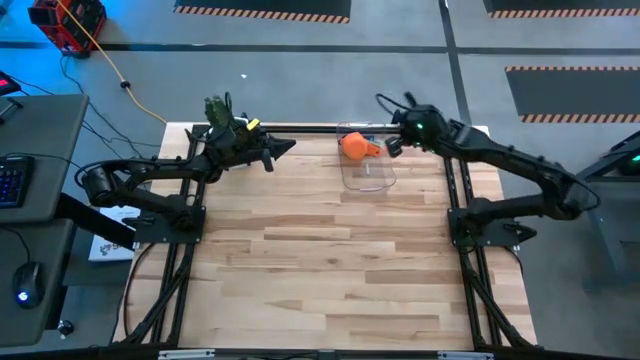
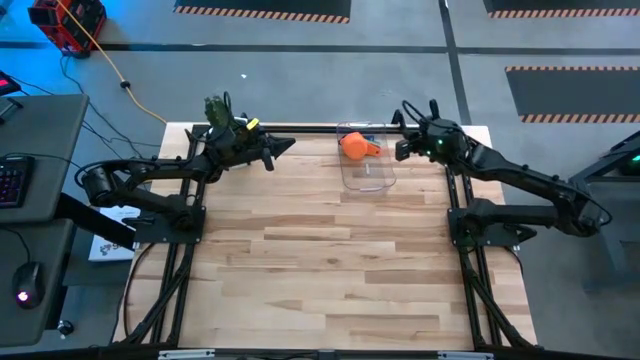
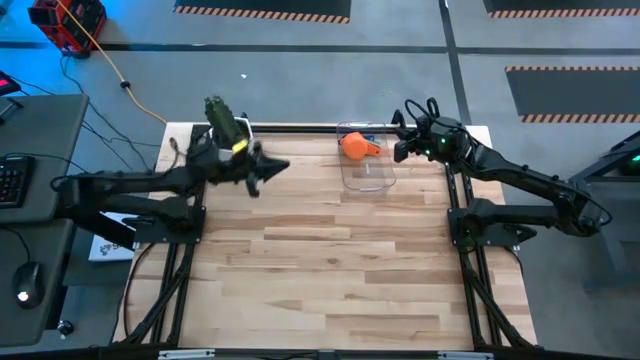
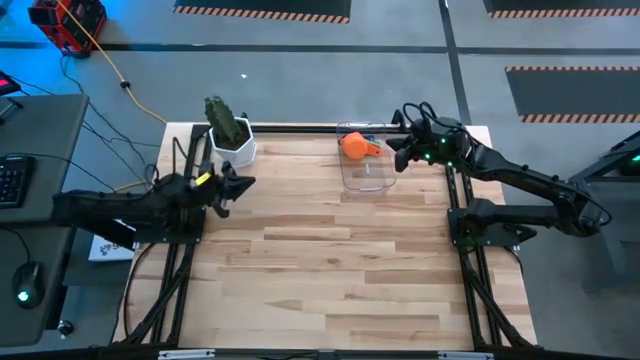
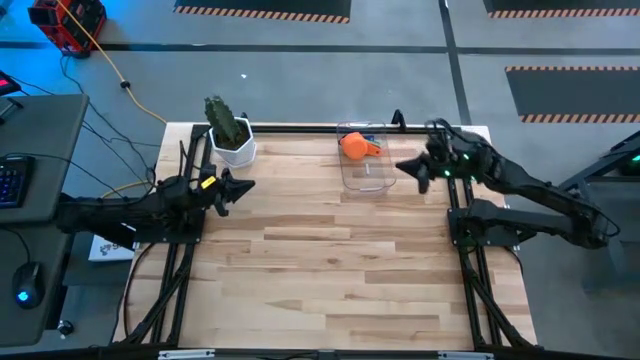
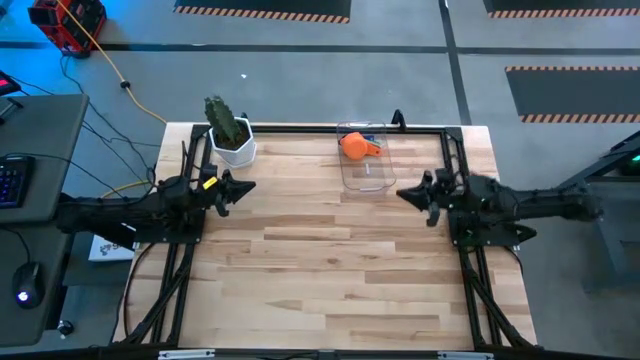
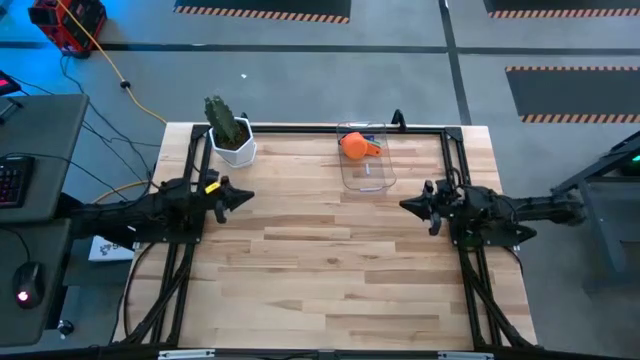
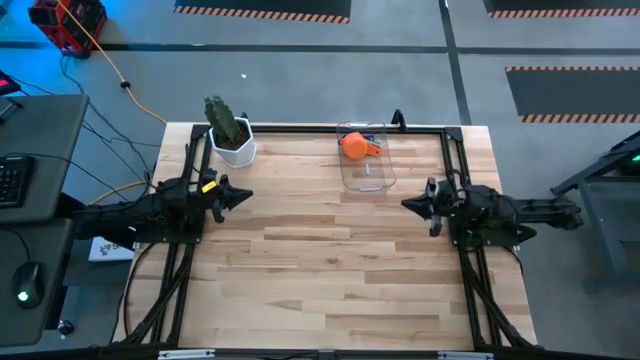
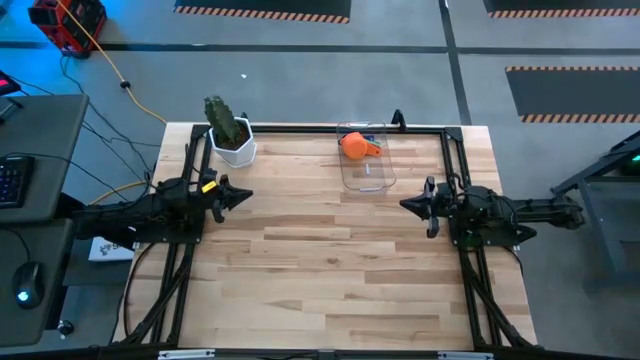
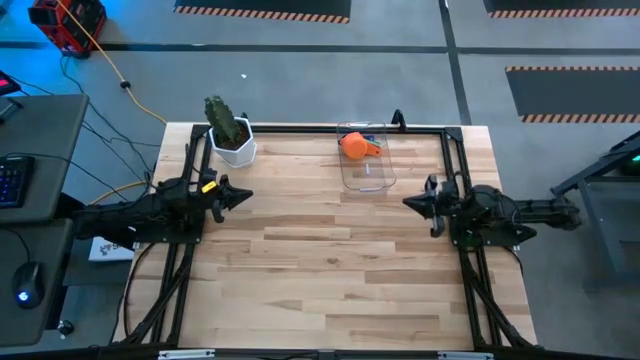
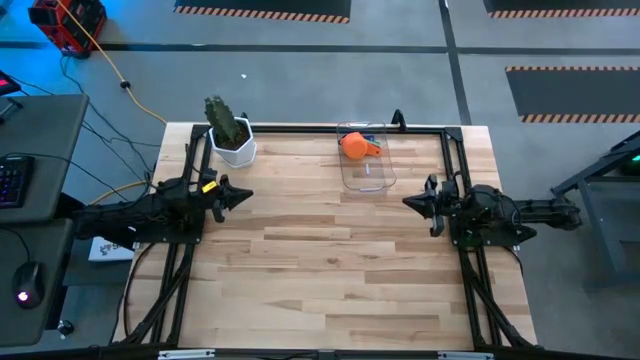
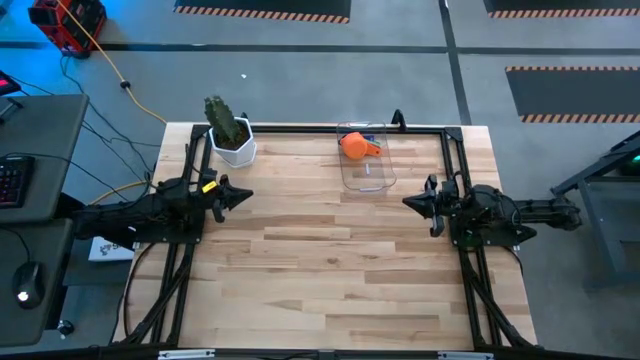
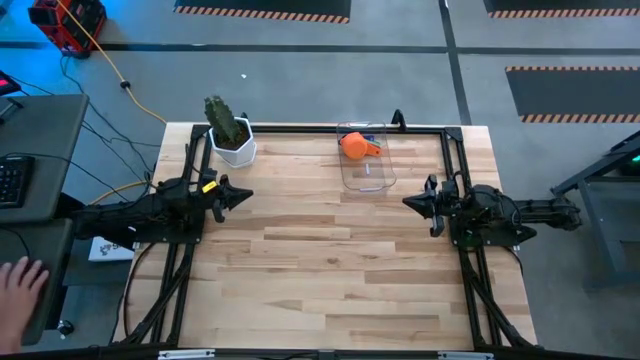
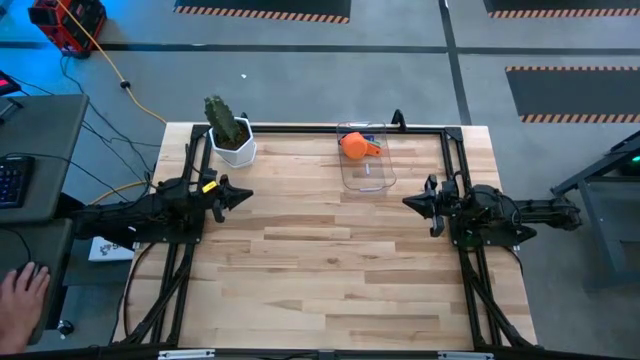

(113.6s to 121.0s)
Task: Nest measuring cups in basket
Return to Home Position

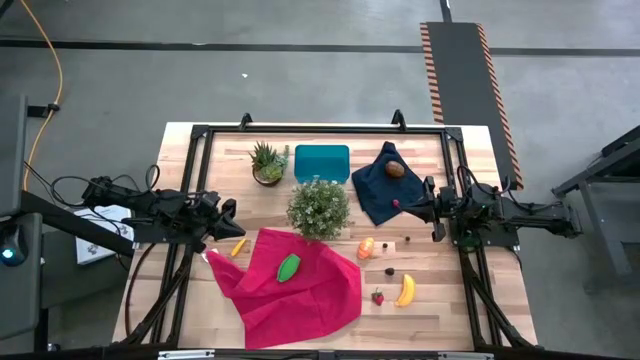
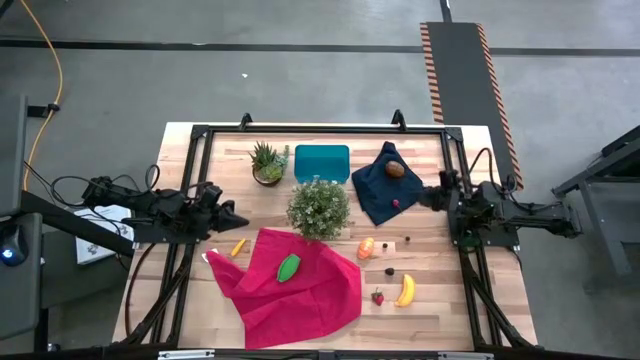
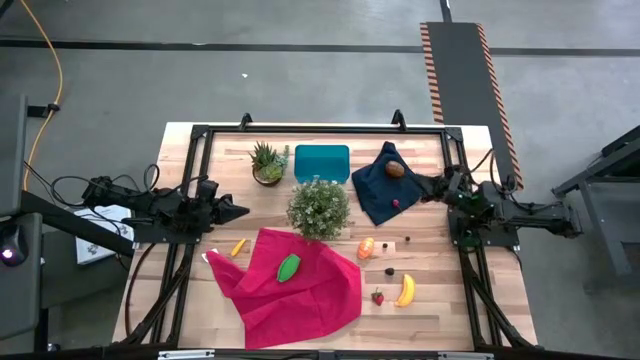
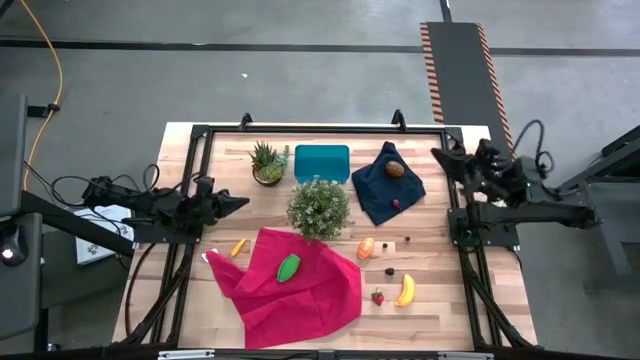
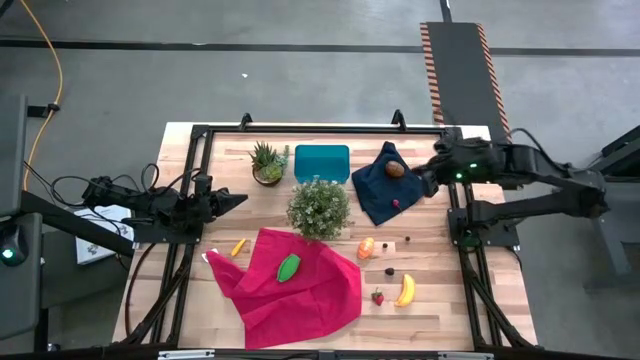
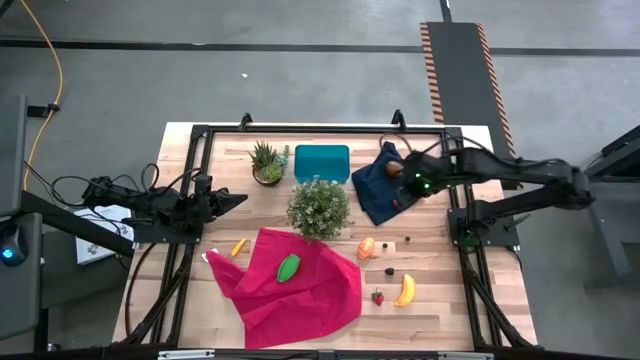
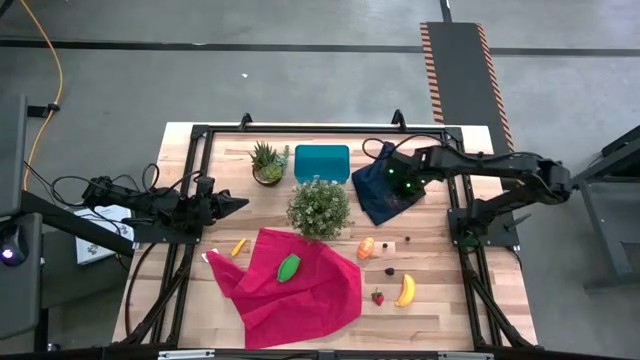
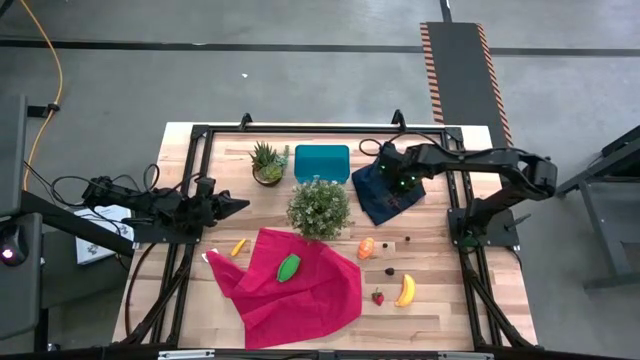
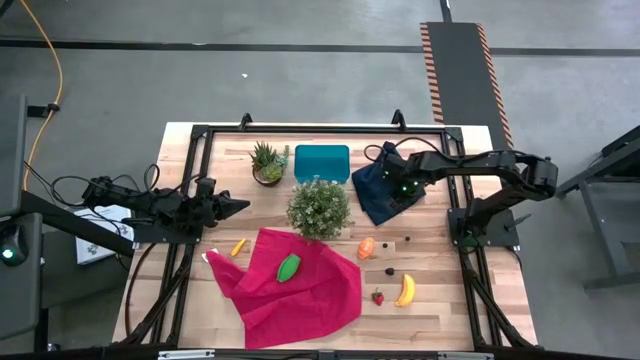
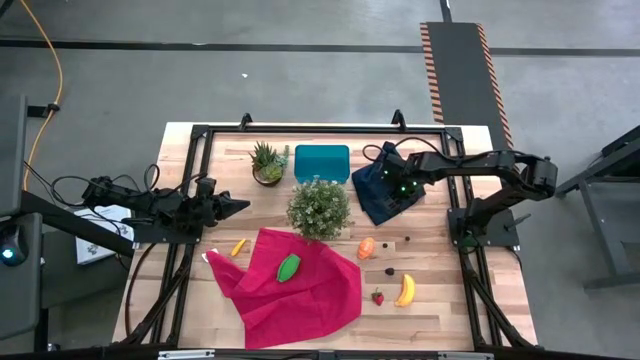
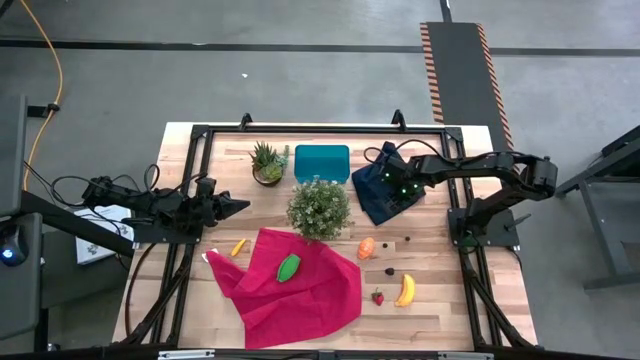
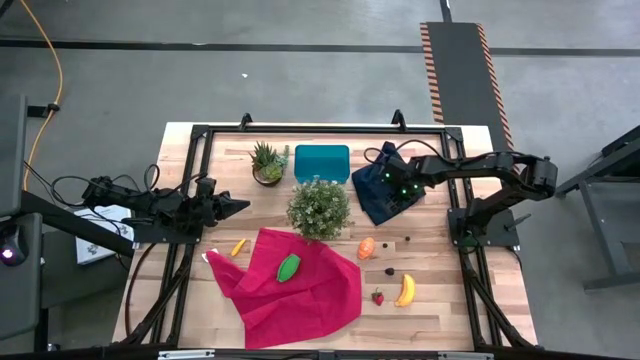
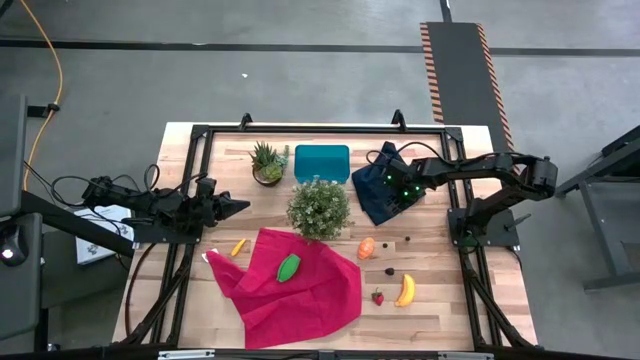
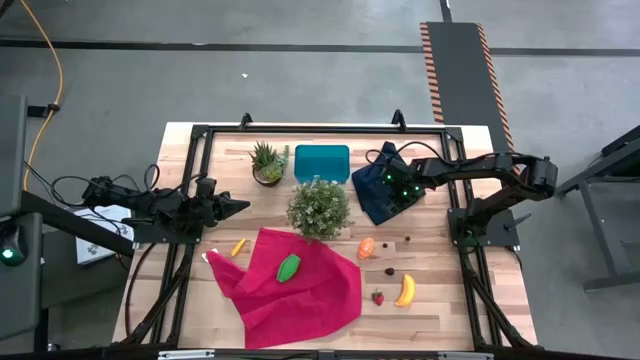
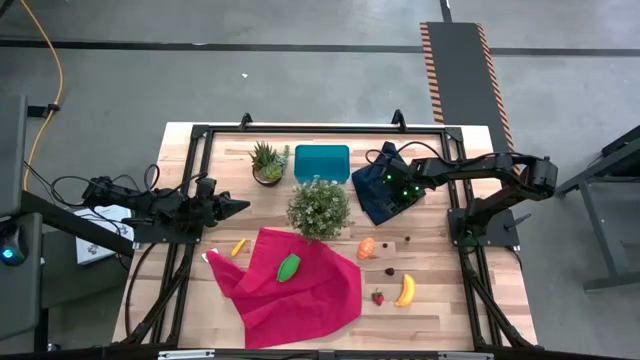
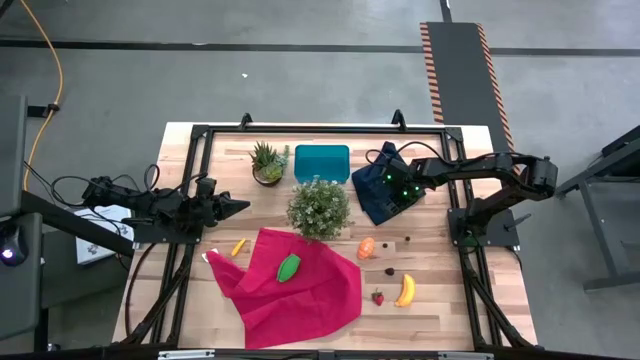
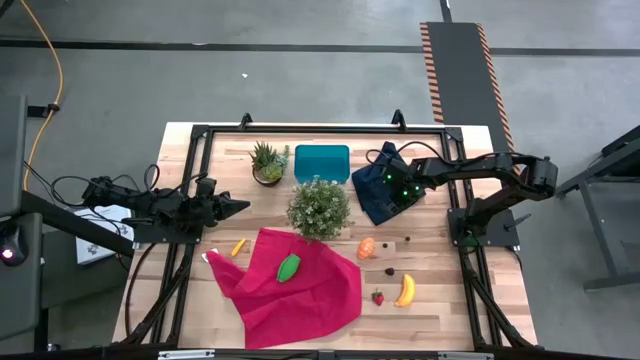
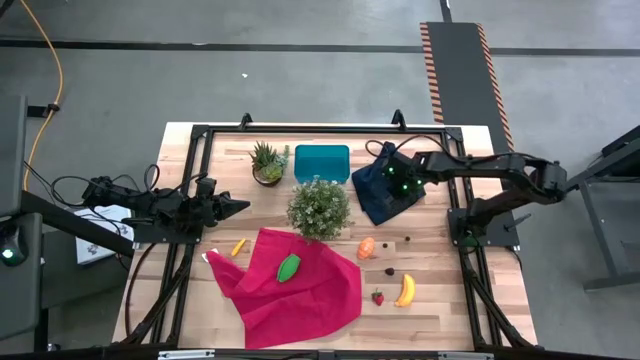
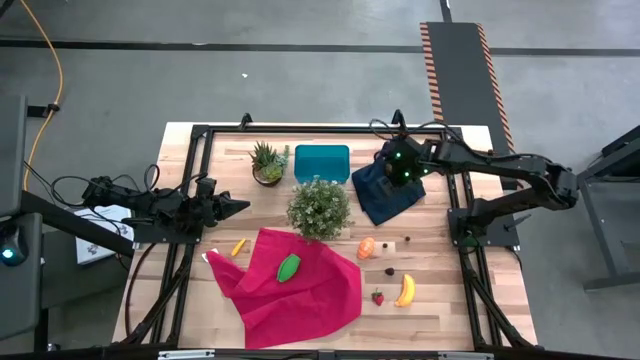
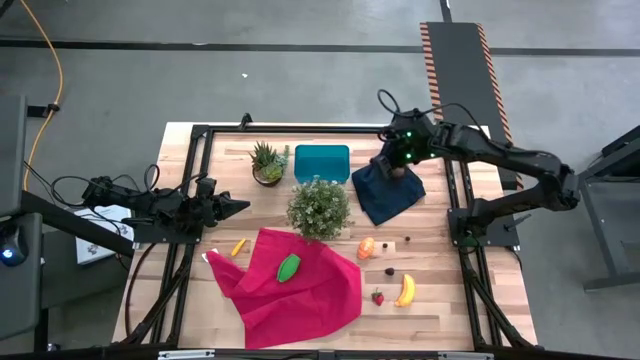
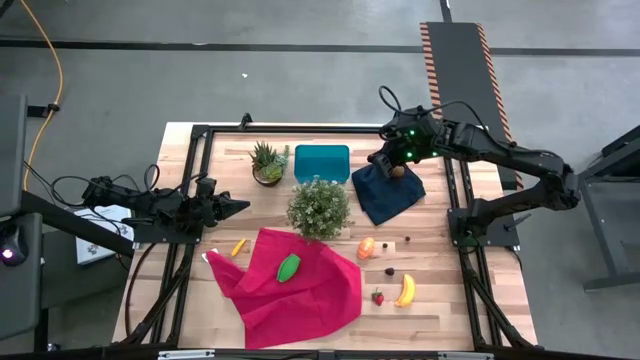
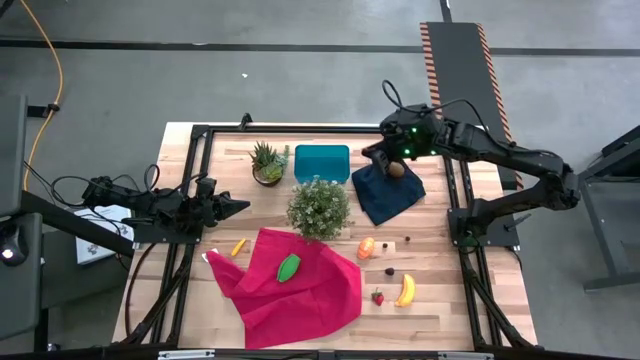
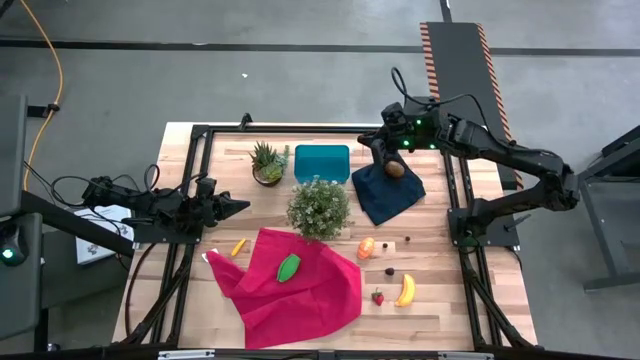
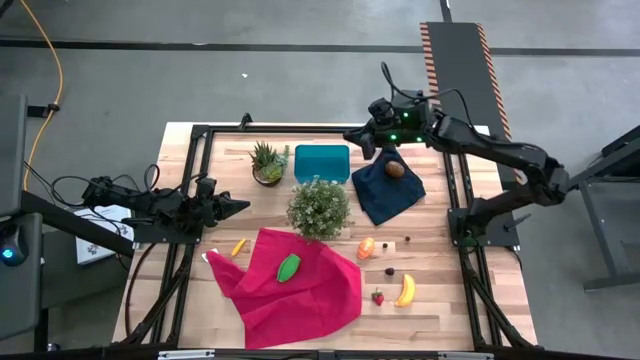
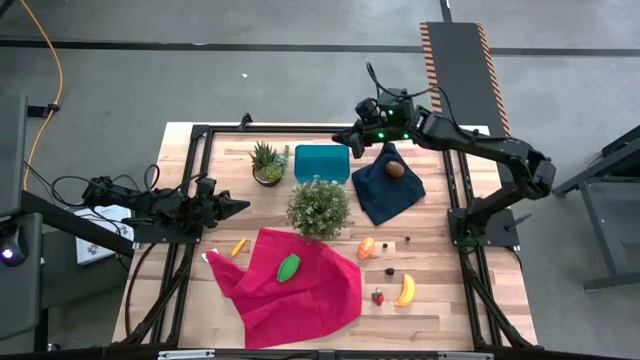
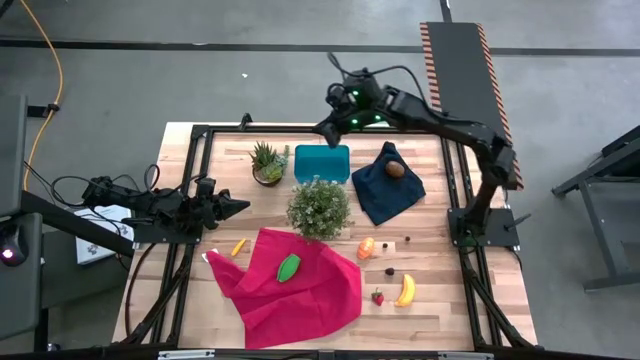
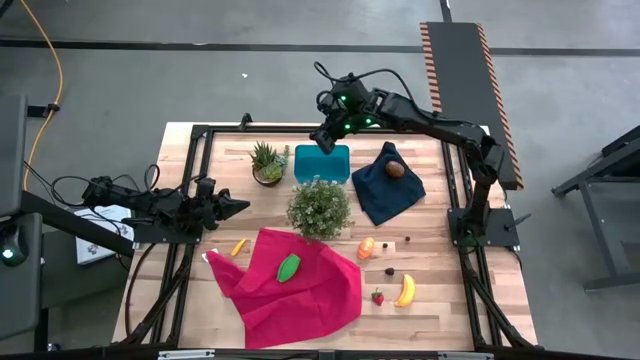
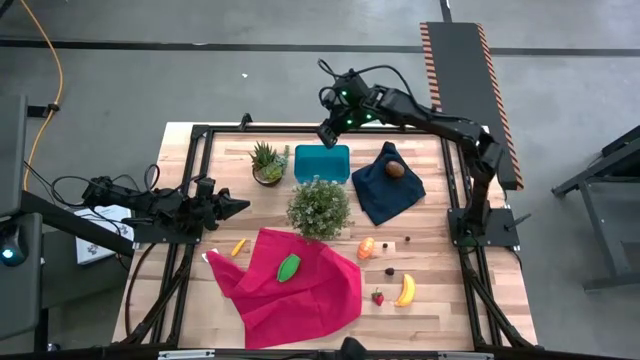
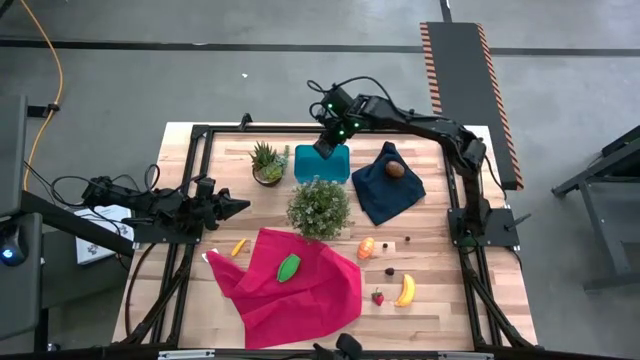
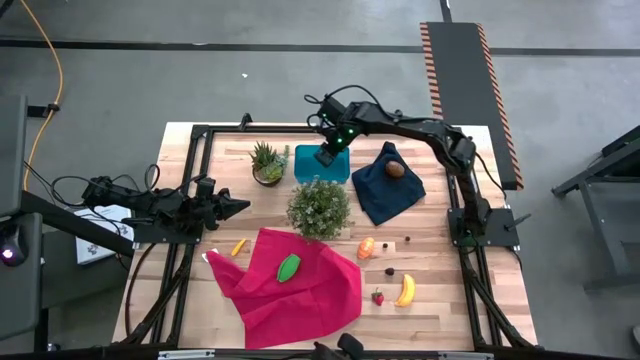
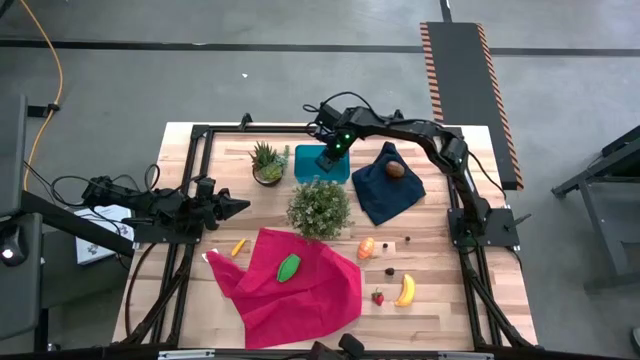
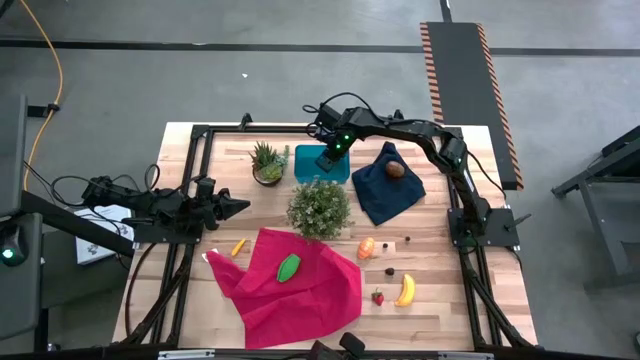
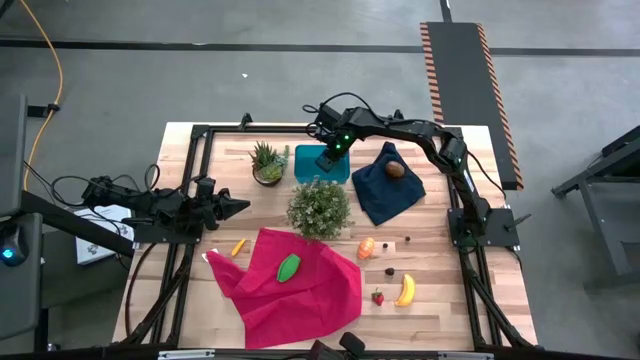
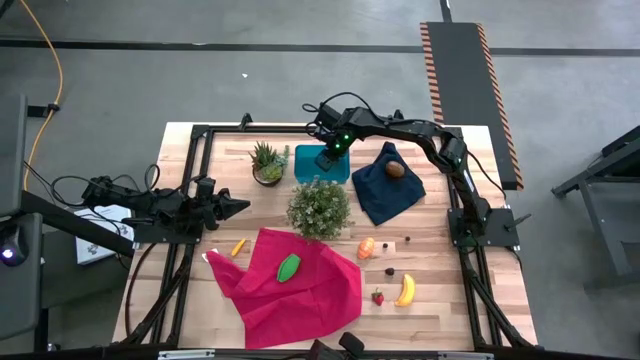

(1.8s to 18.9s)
Task: Pick and placing Produce into tupperware
Put the red cherry into the blue bin
